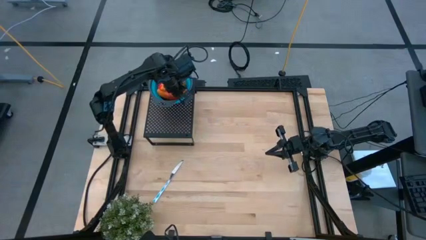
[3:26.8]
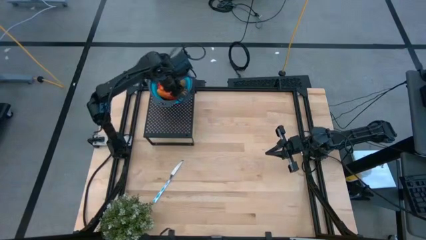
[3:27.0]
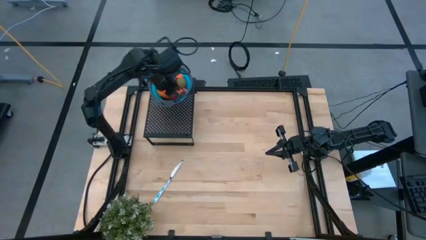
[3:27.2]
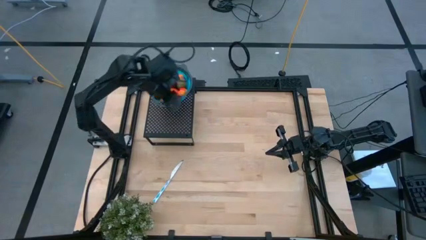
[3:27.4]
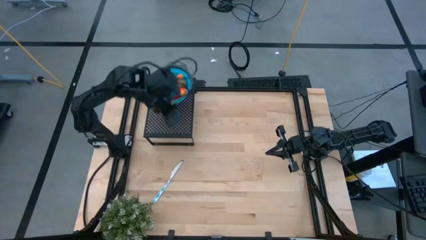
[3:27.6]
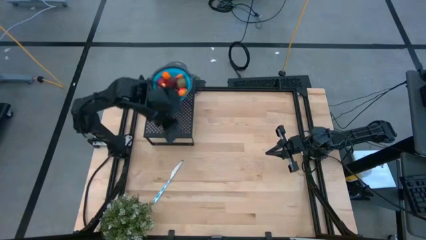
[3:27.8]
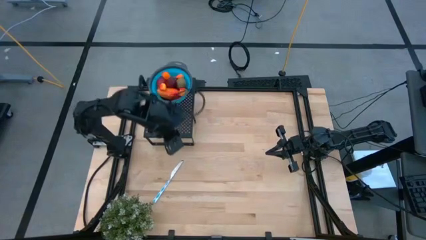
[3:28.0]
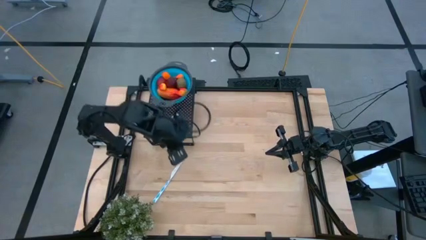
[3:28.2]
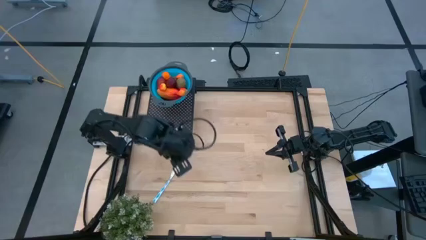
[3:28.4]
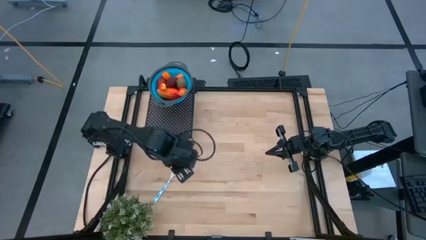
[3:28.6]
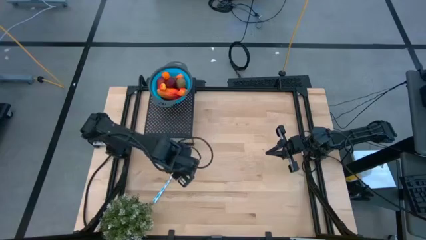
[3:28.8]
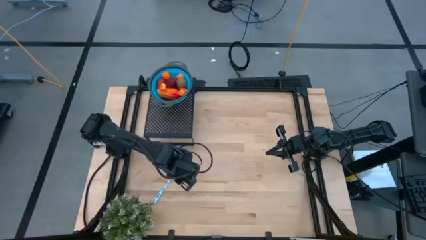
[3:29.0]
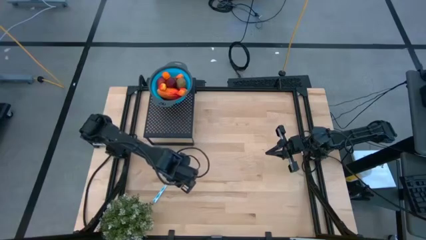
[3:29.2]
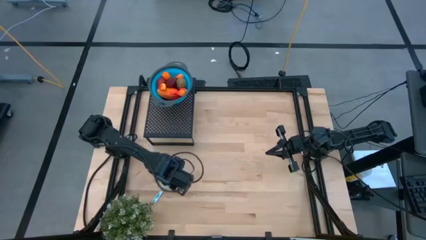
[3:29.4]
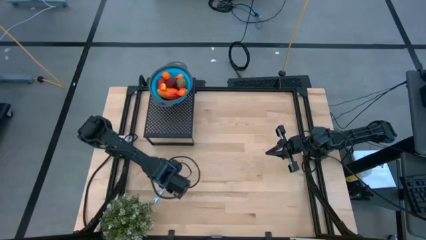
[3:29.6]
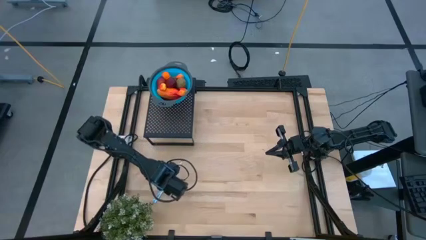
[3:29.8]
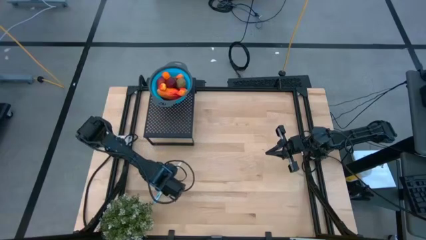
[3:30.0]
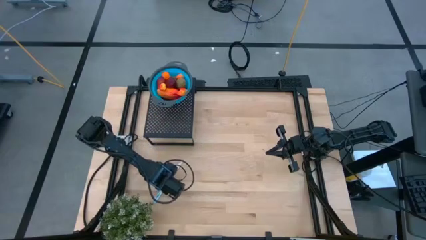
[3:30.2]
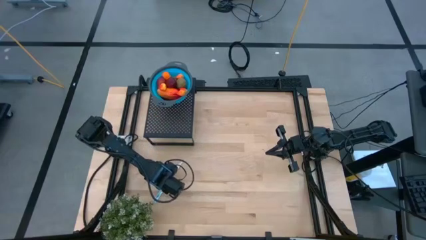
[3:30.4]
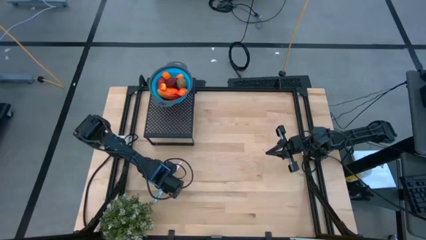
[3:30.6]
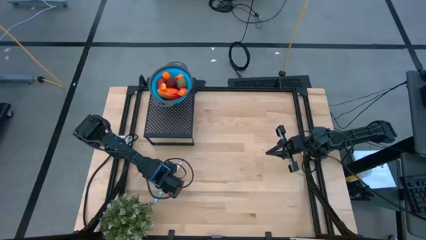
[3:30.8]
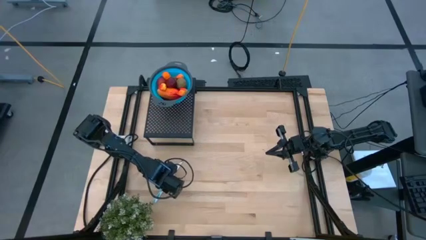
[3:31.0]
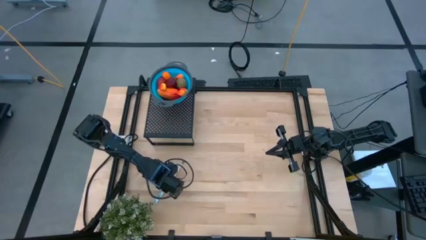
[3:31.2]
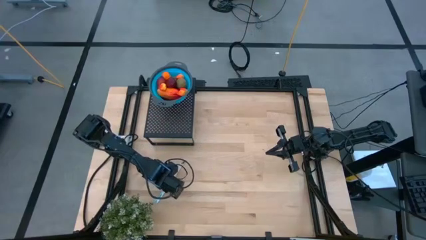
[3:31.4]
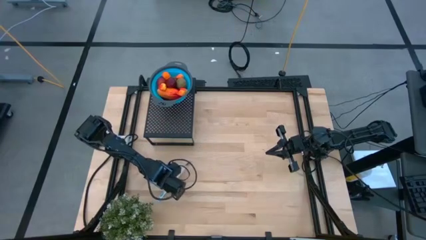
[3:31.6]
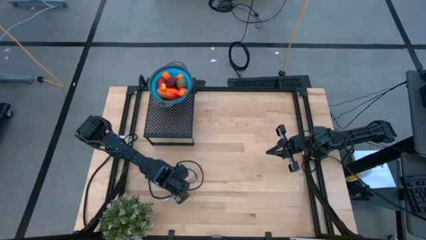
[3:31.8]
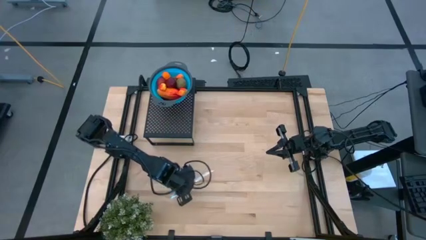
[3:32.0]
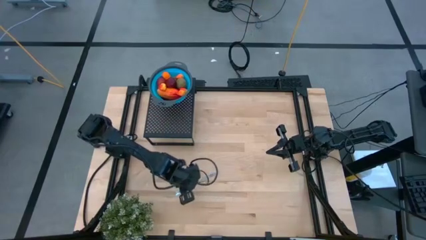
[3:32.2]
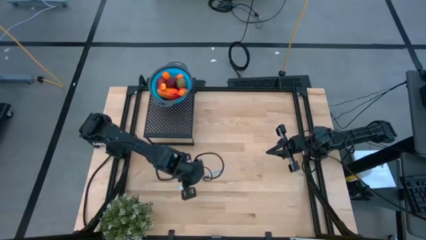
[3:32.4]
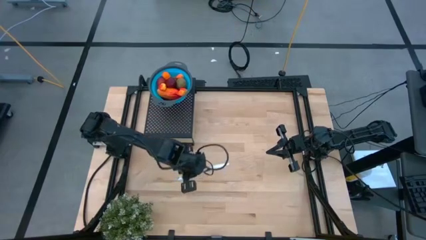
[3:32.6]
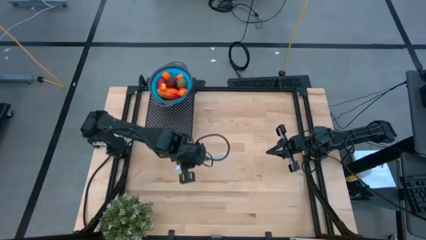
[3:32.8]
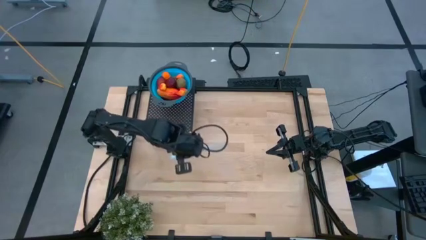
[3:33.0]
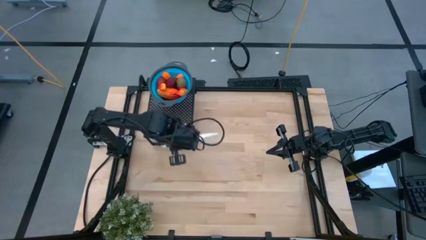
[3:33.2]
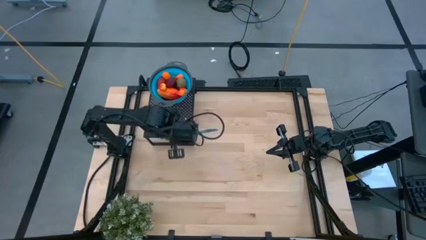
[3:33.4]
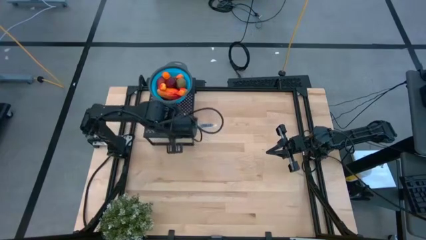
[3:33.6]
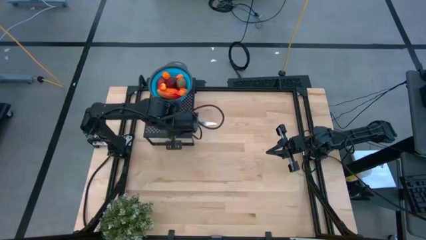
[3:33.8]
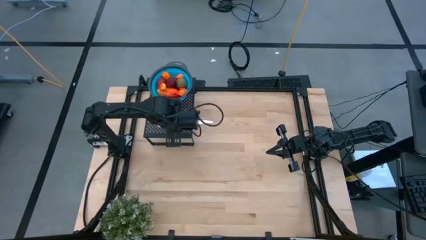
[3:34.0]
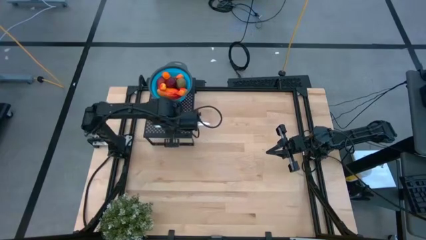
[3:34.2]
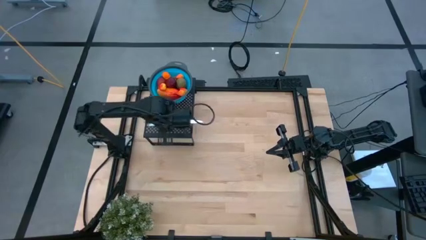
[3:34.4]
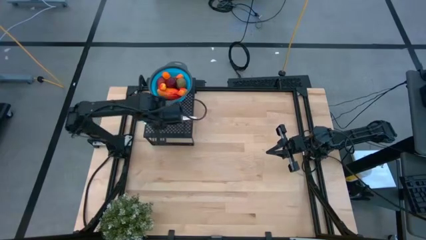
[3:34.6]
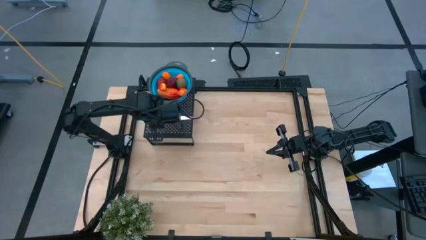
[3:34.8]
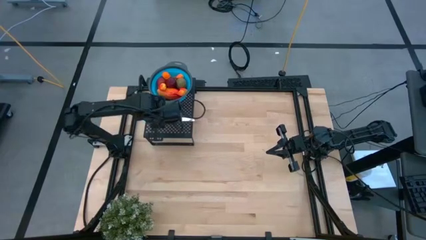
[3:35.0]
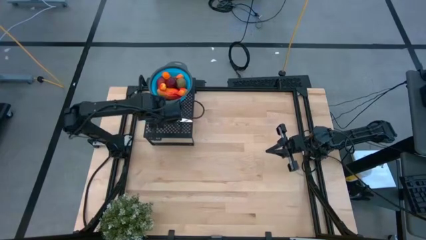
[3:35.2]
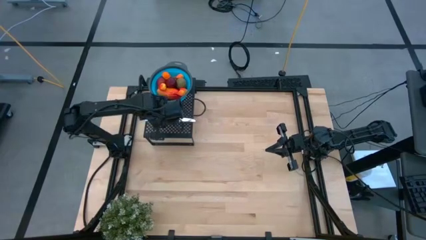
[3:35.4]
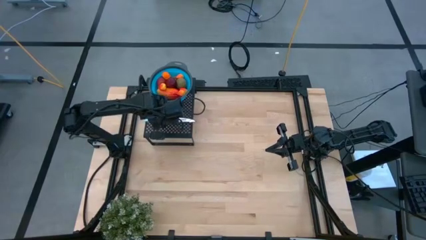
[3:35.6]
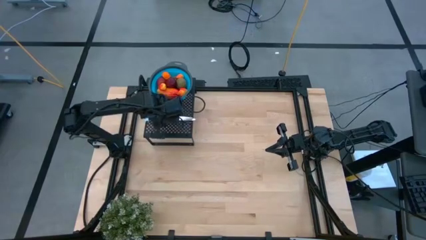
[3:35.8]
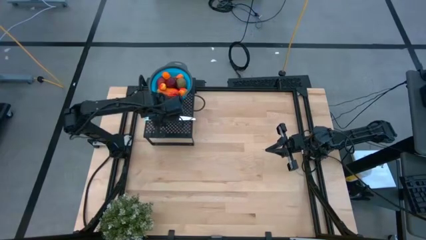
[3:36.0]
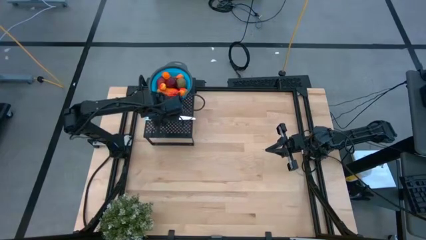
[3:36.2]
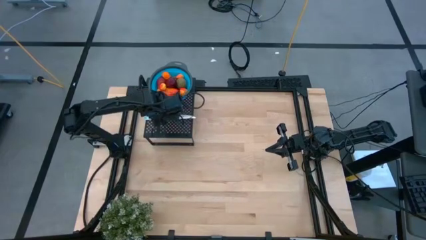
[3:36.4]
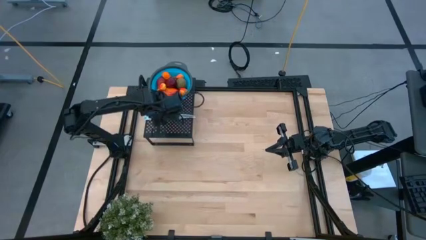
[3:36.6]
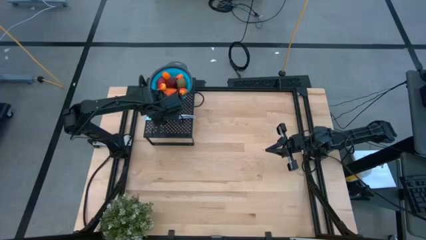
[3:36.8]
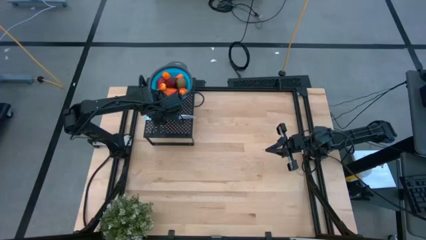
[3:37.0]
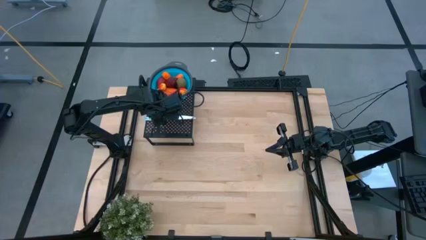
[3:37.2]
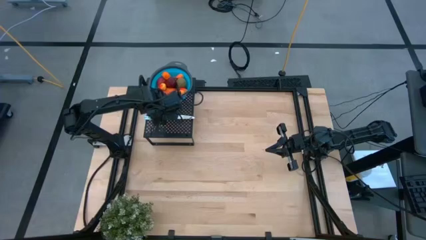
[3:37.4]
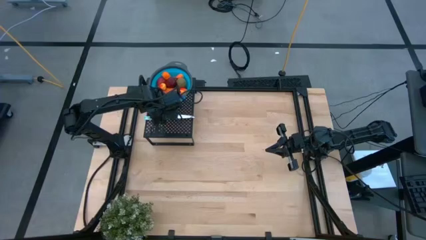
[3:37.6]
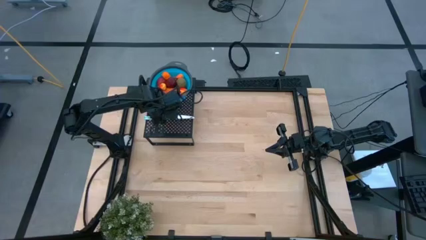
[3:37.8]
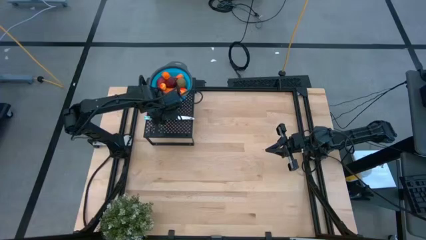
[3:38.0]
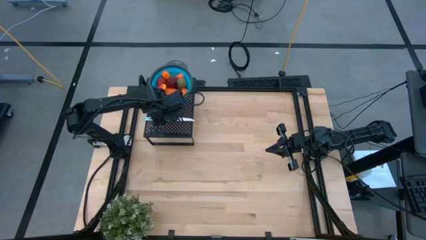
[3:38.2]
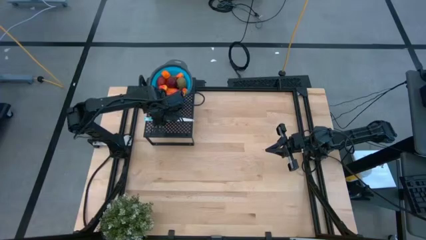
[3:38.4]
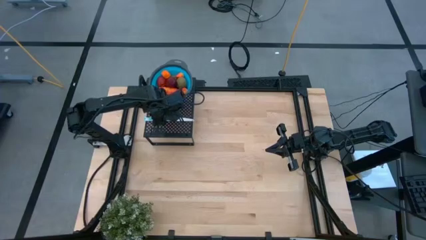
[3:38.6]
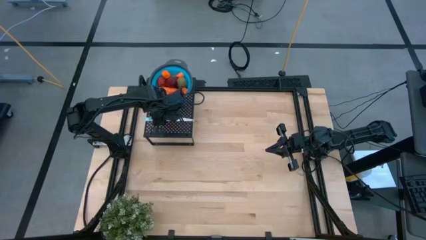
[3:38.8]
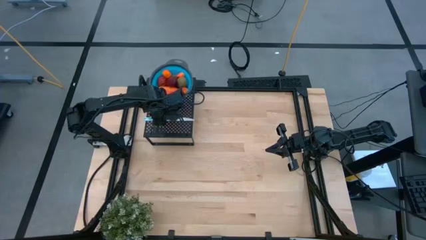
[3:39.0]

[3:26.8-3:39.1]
Task: Pick & Place Fruit
Put the blue knife on the shelf

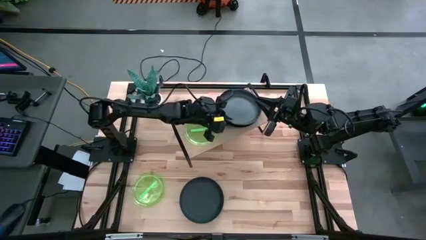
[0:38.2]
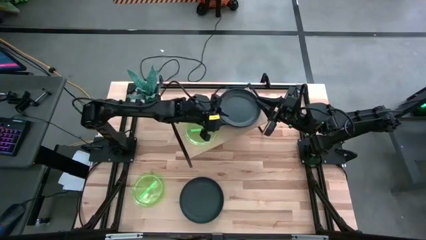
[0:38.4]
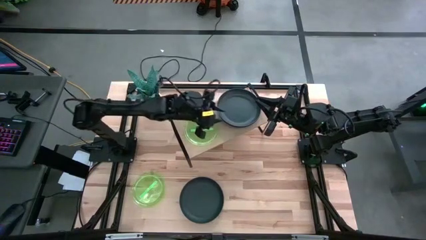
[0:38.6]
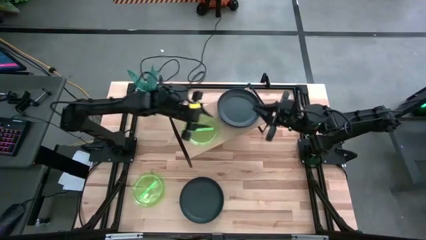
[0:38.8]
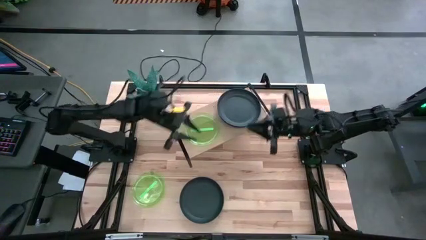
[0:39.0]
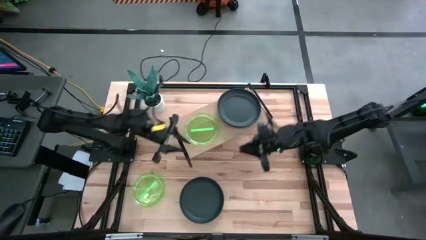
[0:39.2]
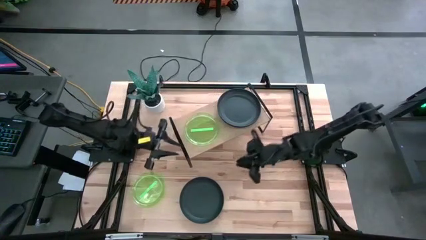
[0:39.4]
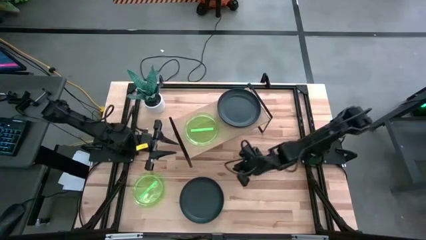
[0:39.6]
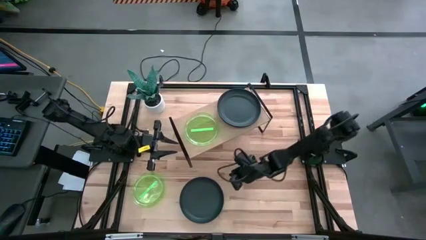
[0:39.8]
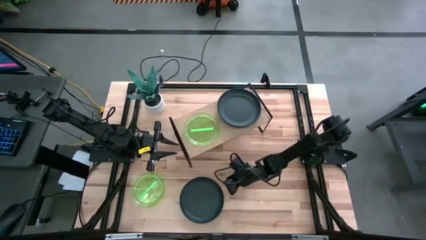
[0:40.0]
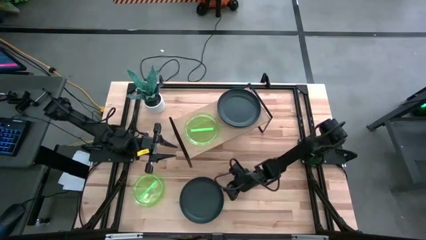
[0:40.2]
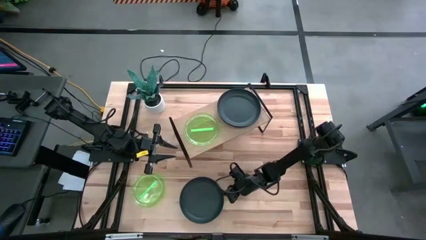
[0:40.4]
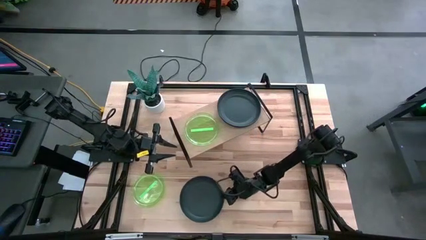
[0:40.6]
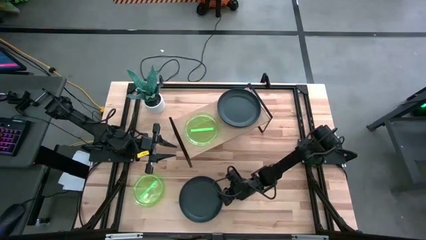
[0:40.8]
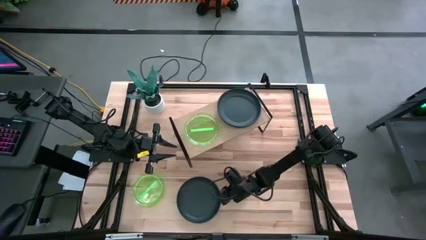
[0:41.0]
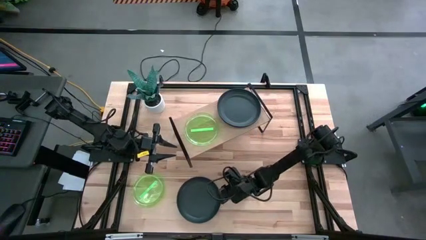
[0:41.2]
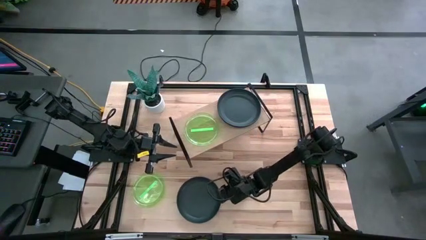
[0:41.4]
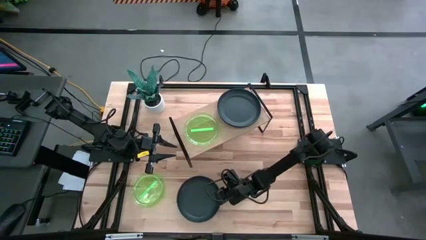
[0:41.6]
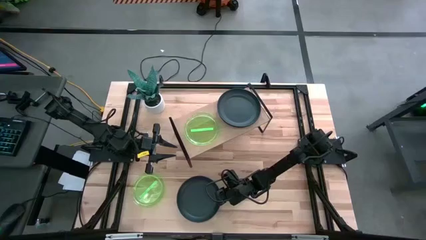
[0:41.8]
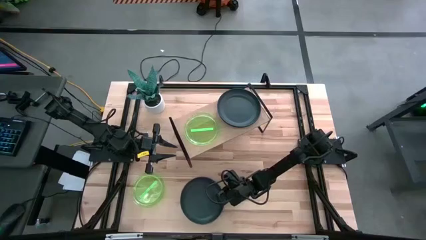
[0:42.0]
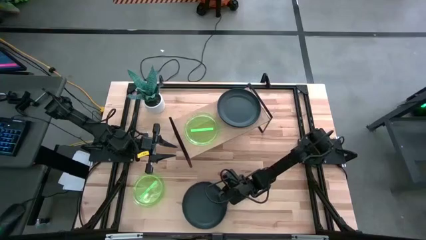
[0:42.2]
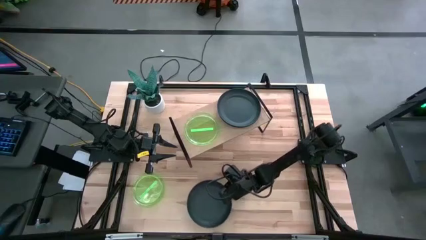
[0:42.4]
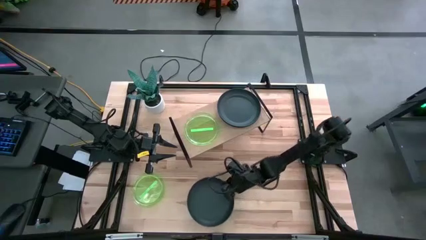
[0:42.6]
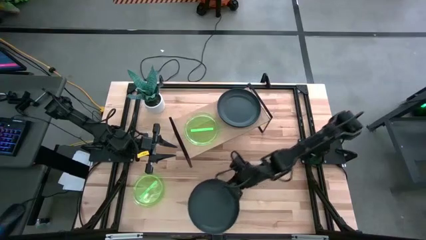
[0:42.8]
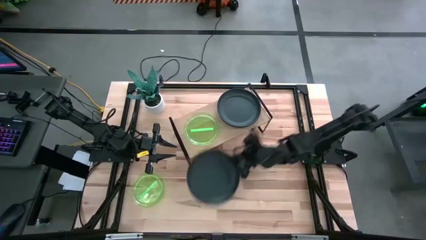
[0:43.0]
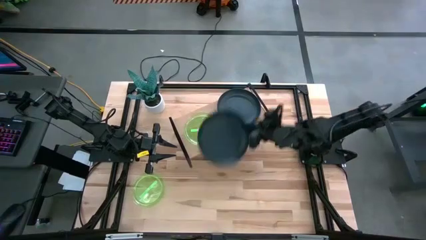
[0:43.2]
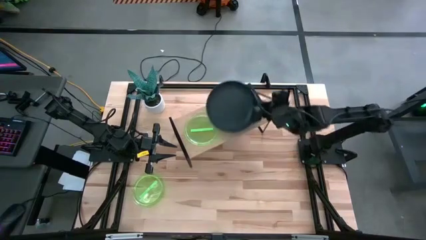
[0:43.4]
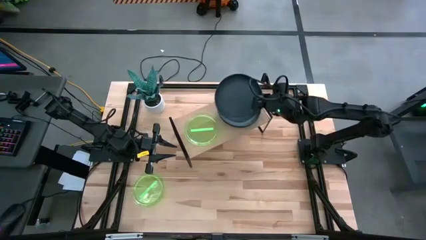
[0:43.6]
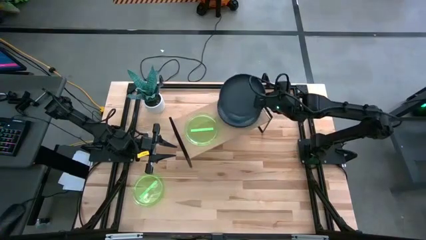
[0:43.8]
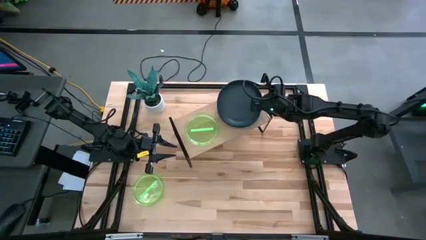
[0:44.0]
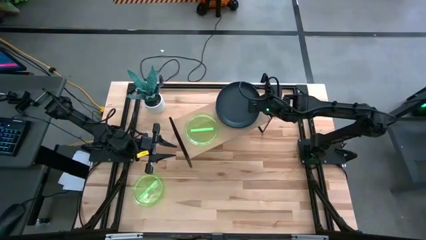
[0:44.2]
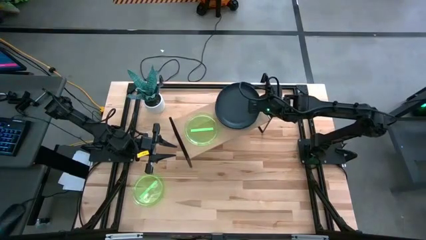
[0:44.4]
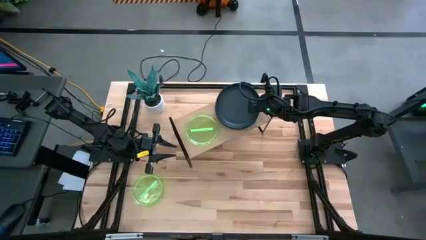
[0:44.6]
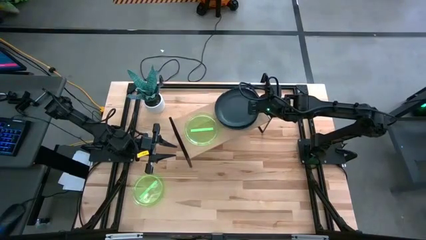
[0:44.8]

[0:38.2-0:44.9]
Task: Place and stack plates onto a shelf
Stack the black plate on top of the other black plates on the shelf
